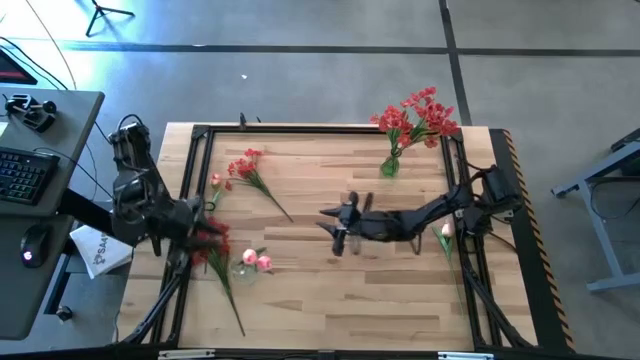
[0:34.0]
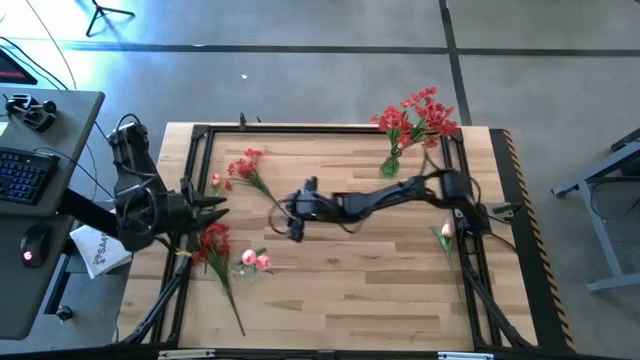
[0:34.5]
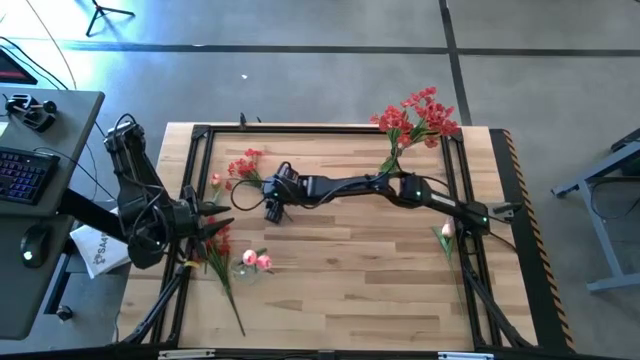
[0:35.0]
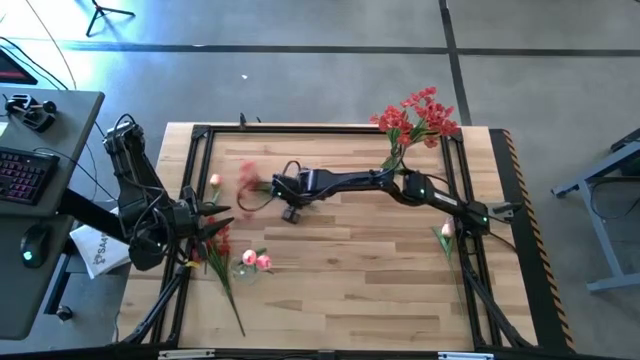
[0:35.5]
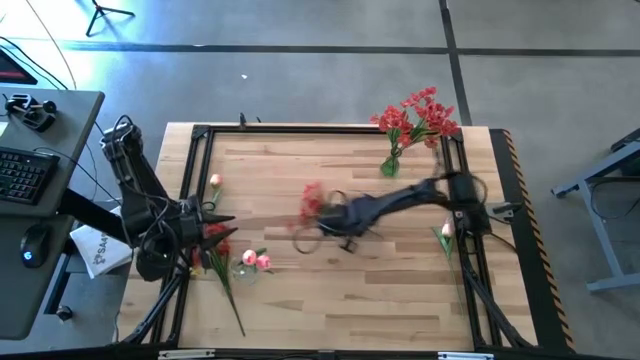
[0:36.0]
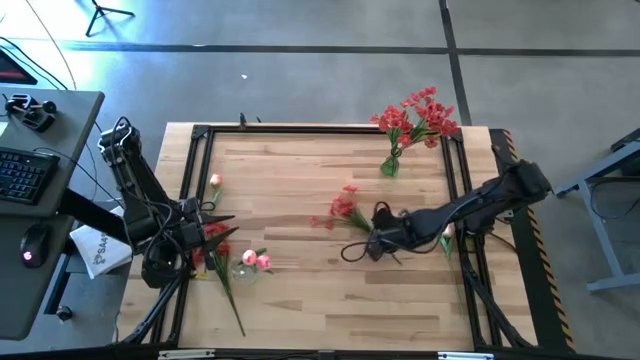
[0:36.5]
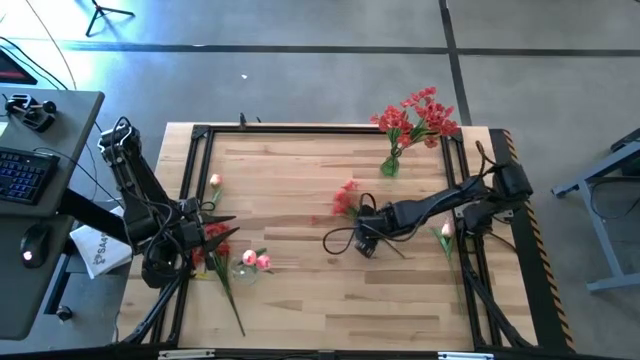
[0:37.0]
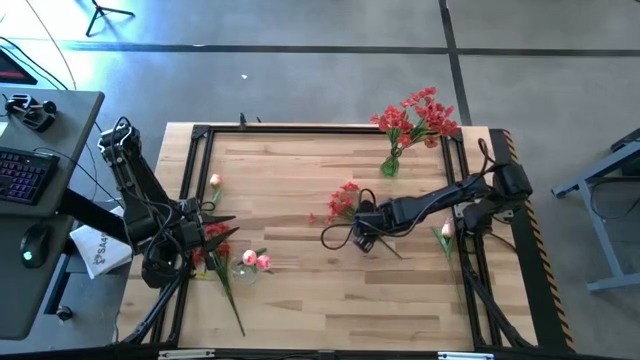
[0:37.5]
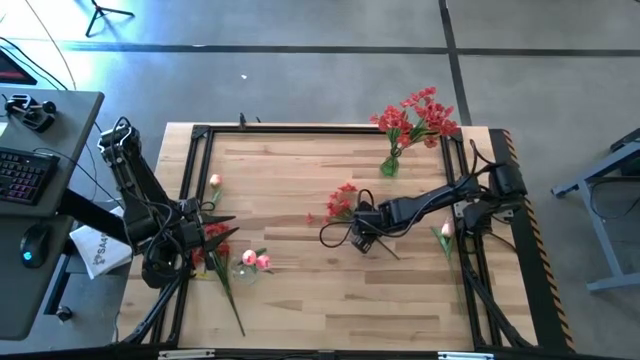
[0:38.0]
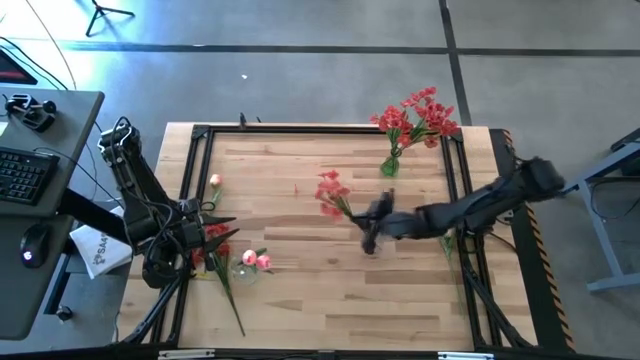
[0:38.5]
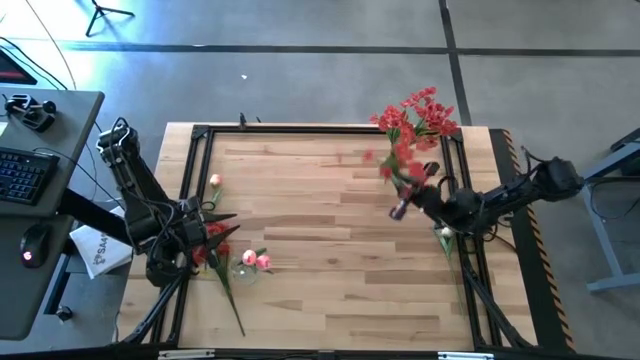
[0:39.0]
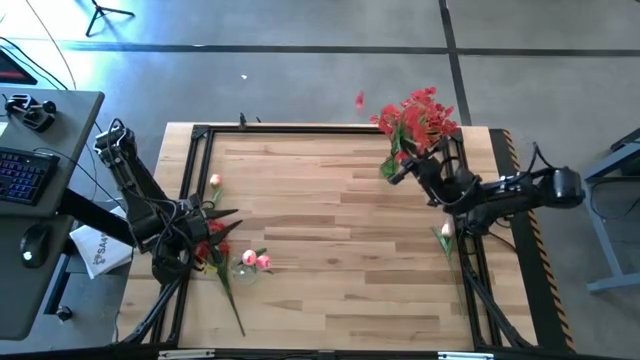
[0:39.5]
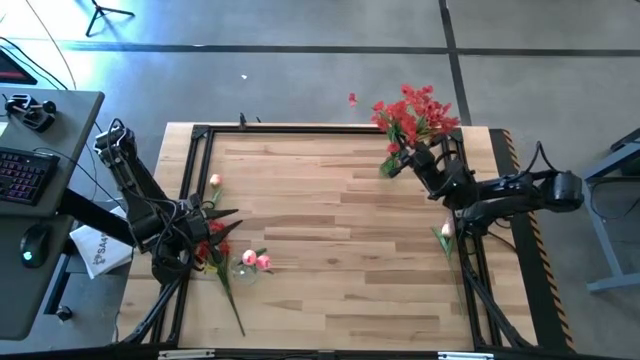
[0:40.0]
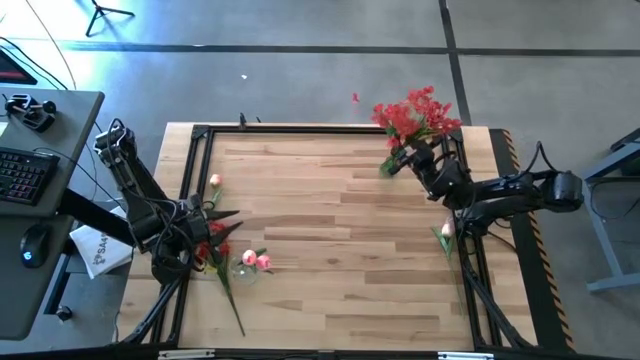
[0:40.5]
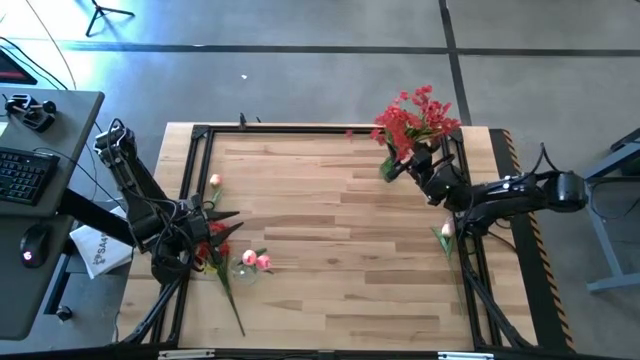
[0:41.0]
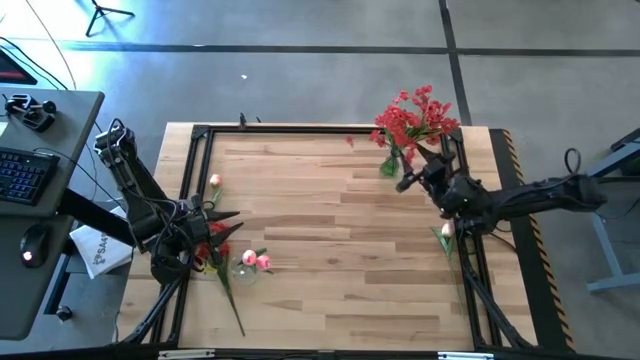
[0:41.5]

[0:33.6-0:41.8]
Task: Sort flowers into vase by color
Put the red flowers into the green vase

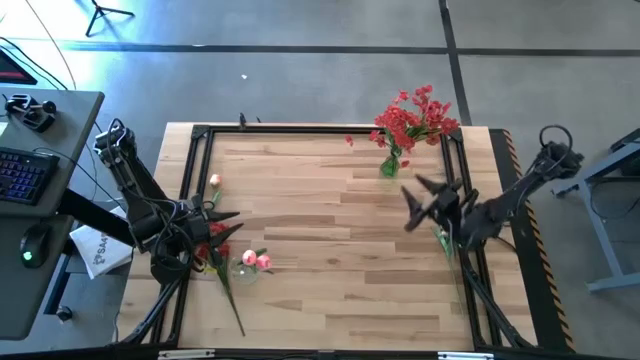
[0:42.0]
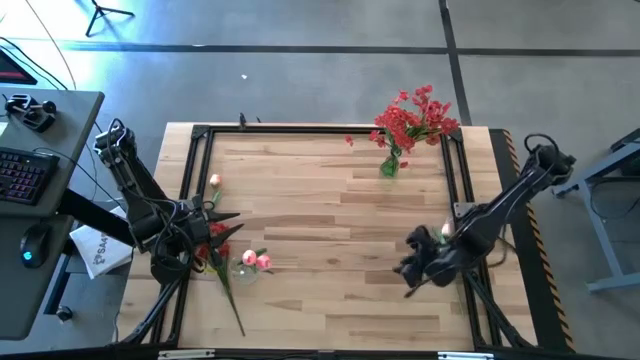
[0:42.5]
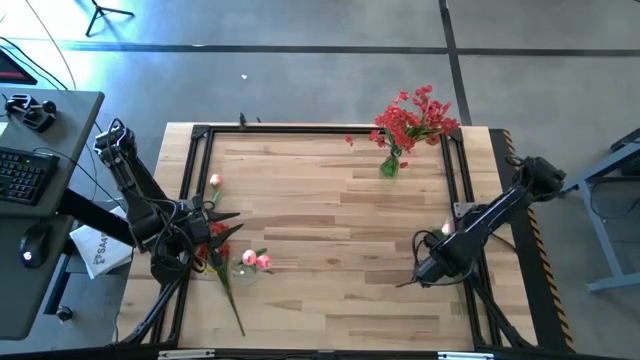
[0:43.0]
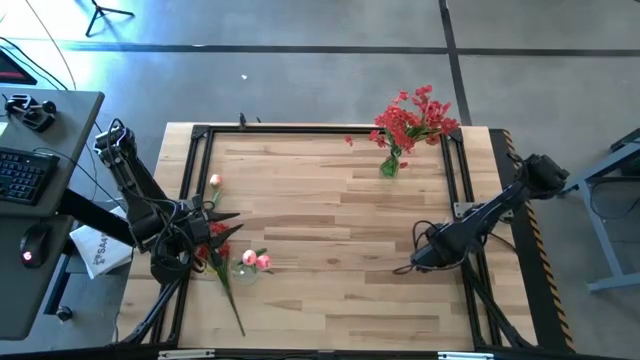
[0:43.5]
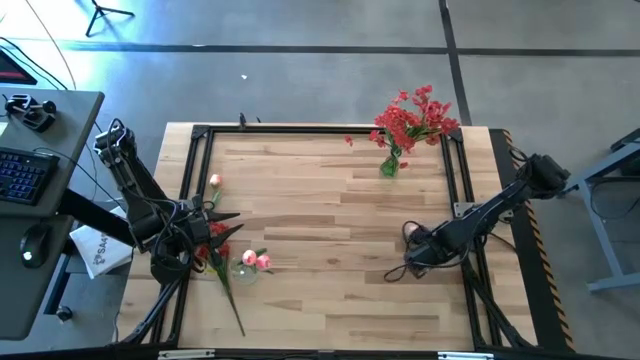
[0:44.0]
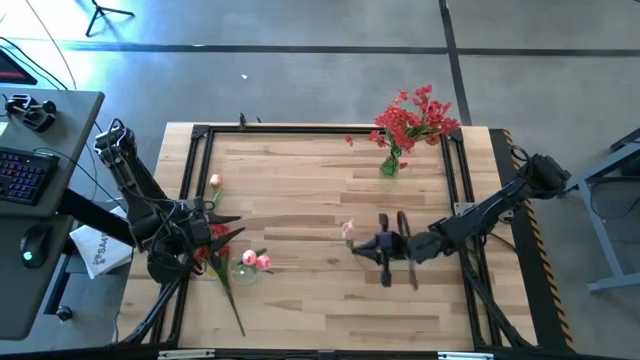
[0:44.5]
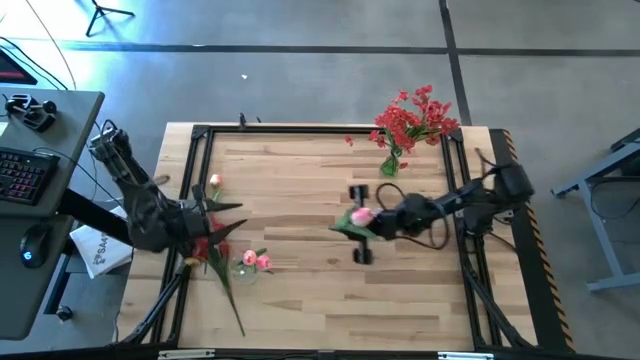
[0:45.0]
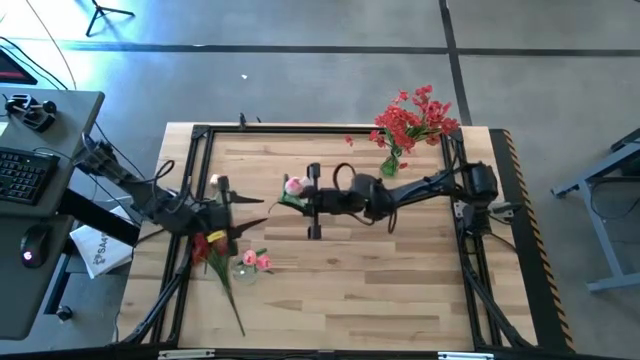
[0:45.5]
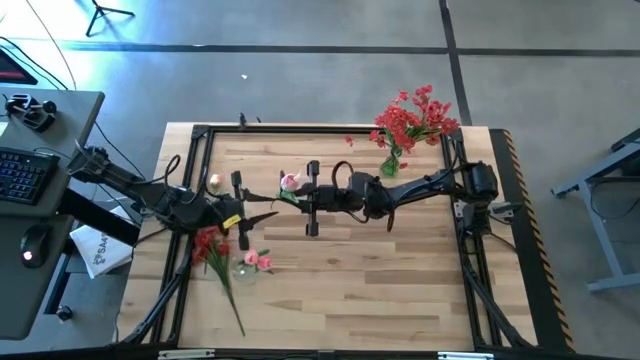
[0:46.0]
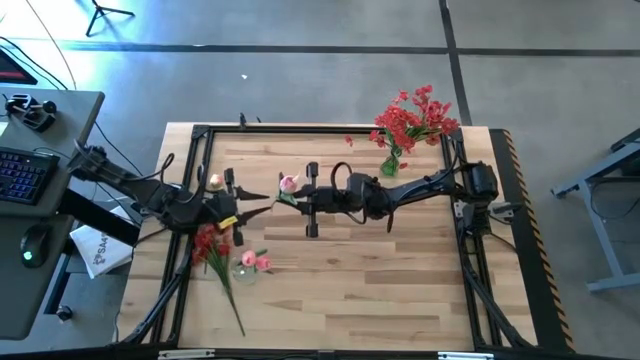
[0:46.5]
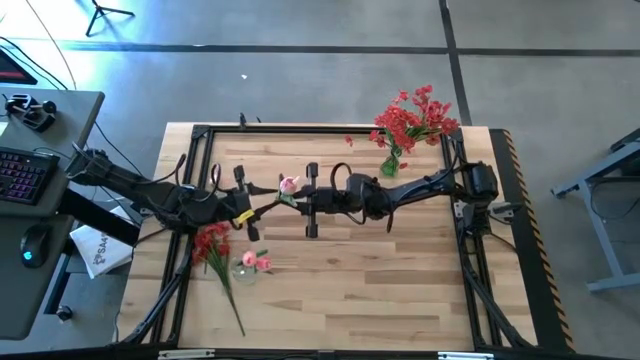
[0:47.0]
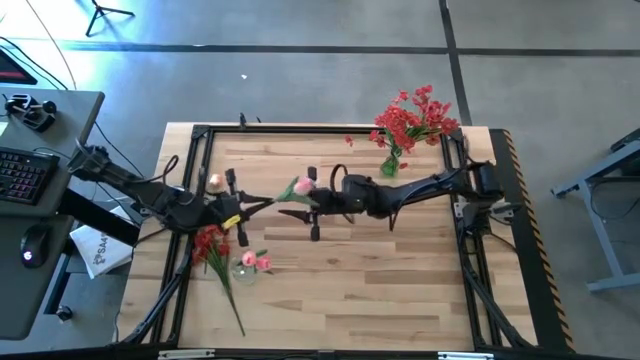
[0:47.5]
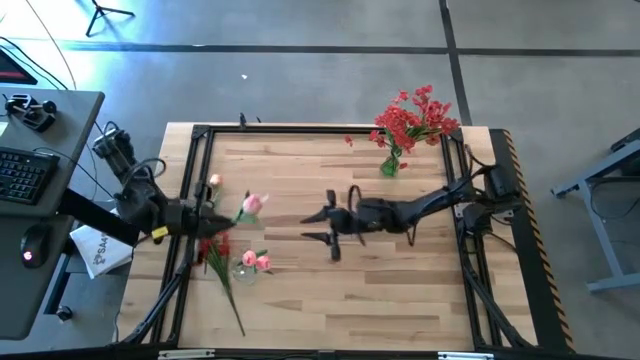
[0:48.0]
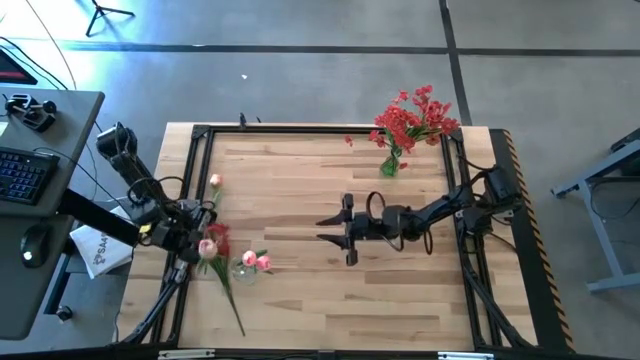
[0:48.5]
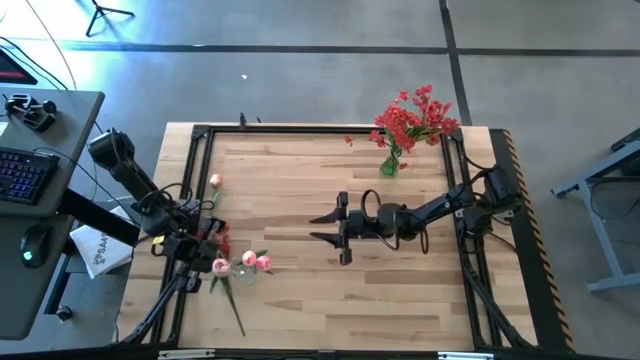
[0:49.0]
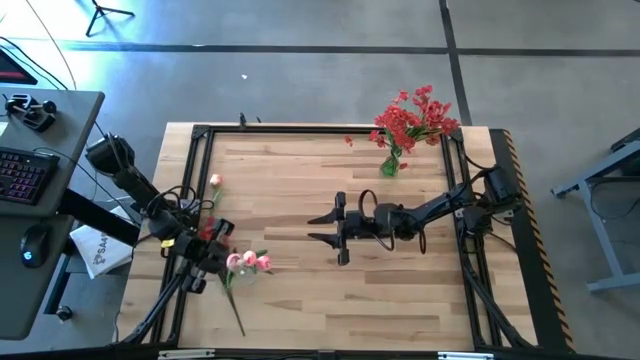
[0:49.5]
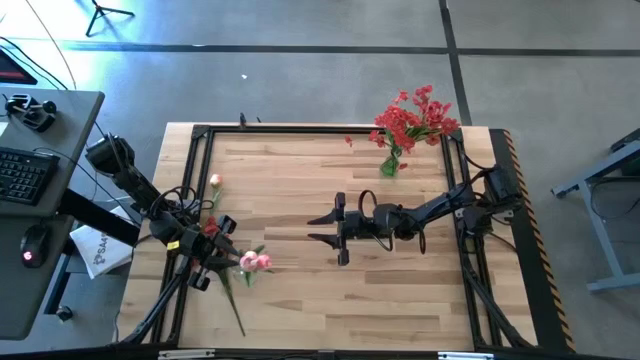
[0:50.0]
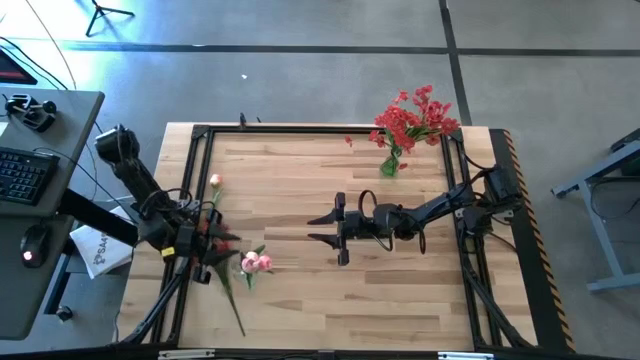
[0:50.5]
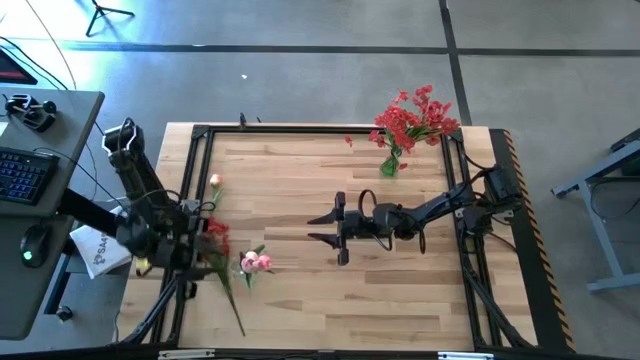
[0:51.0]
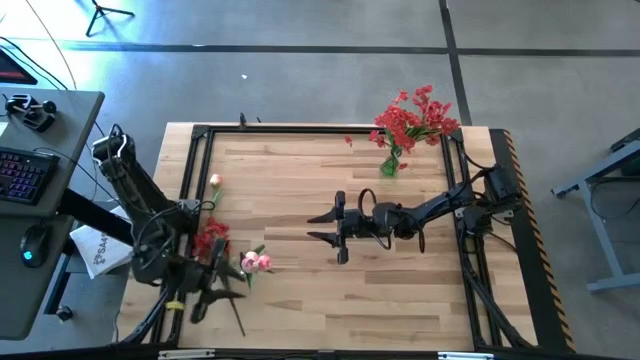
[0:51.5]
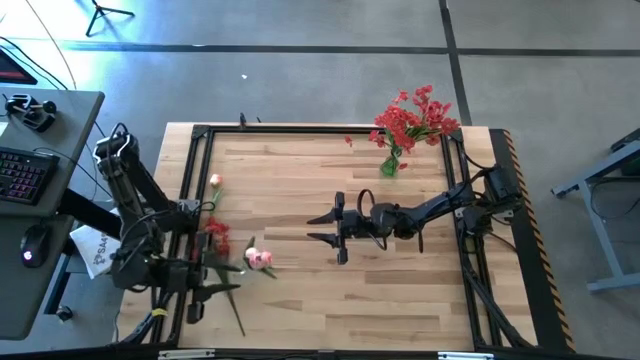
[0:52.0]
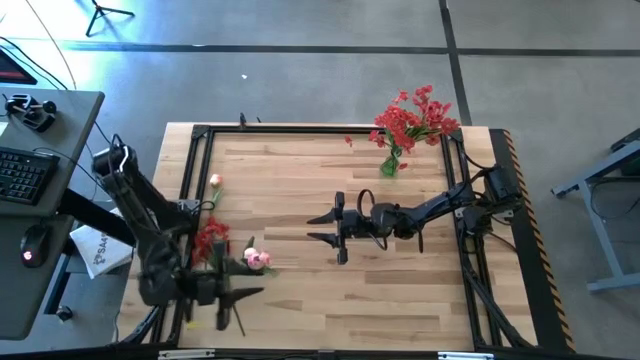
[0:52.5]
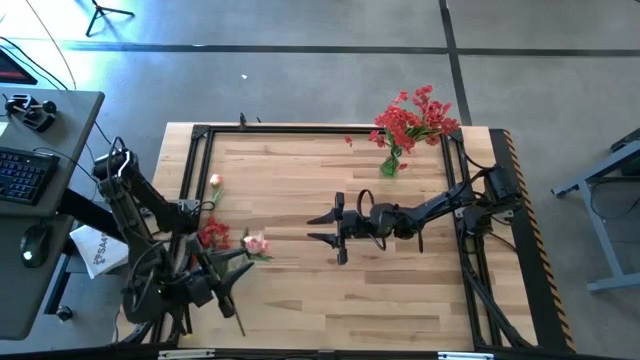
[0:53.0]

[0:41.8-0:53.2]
Put the pink flower into the transparent vase
